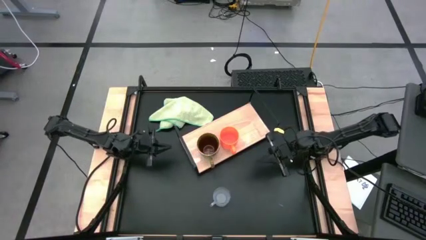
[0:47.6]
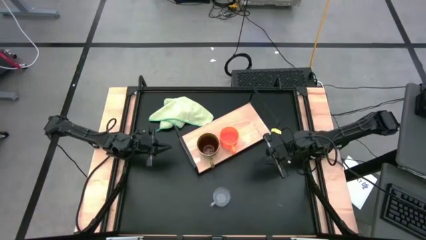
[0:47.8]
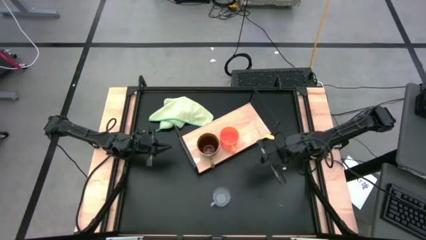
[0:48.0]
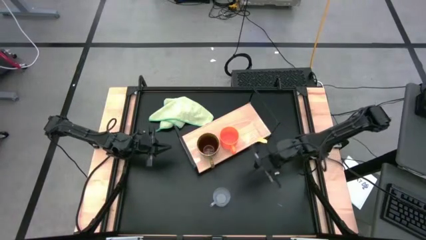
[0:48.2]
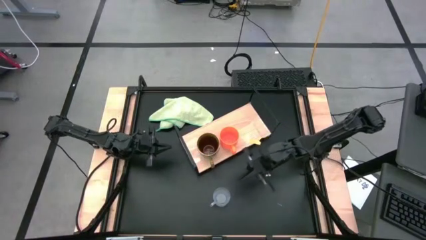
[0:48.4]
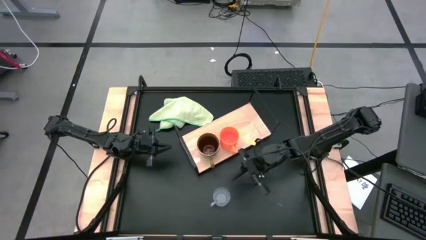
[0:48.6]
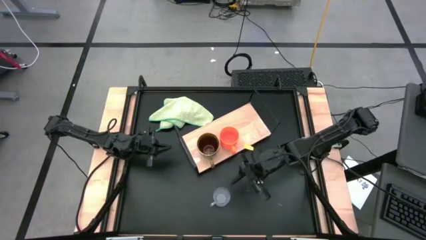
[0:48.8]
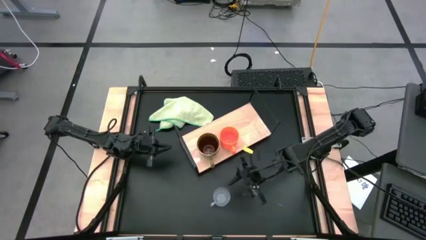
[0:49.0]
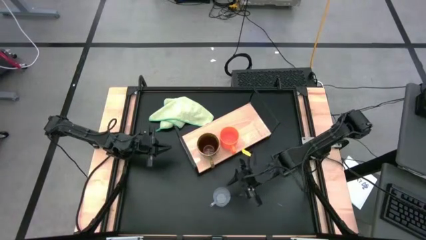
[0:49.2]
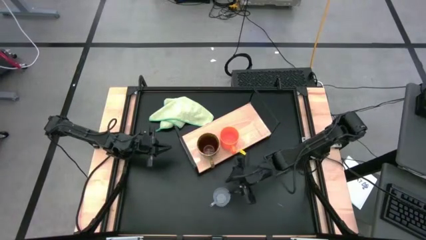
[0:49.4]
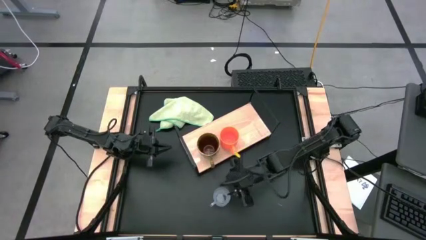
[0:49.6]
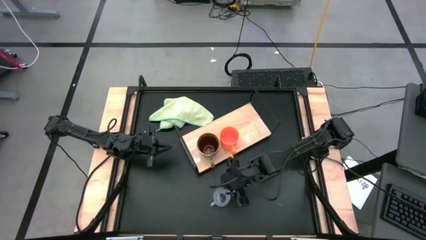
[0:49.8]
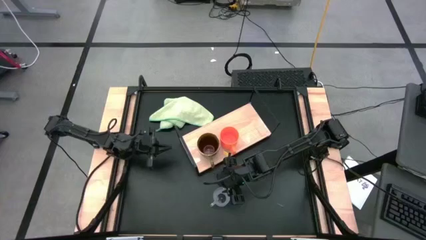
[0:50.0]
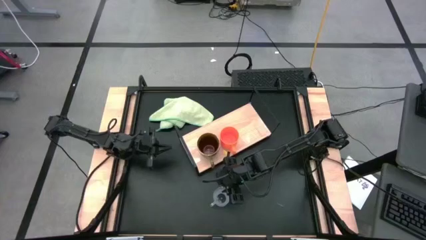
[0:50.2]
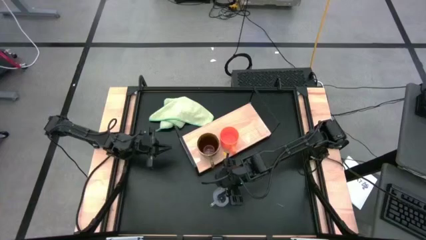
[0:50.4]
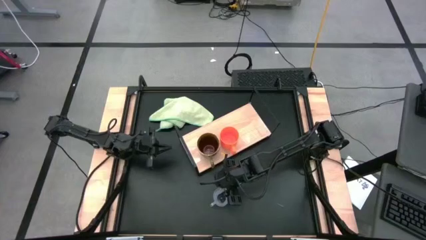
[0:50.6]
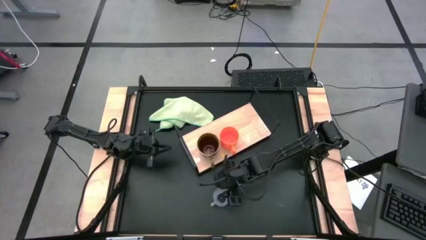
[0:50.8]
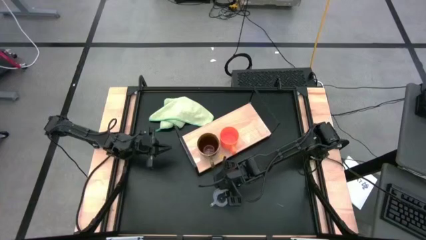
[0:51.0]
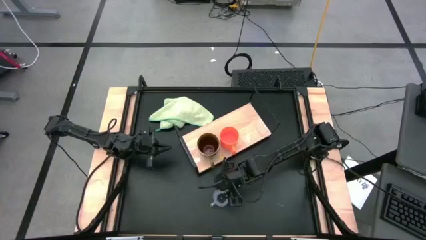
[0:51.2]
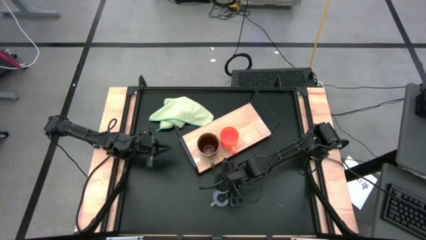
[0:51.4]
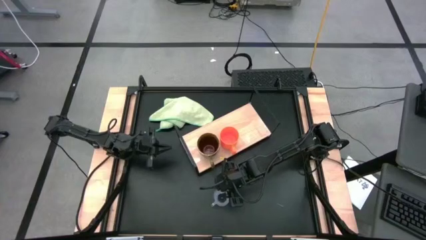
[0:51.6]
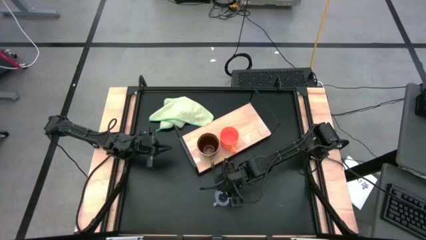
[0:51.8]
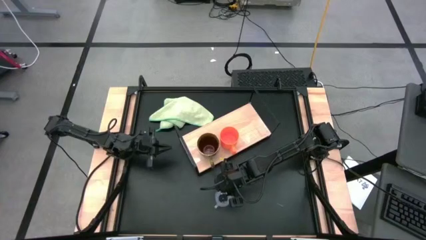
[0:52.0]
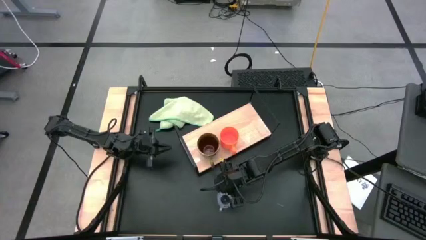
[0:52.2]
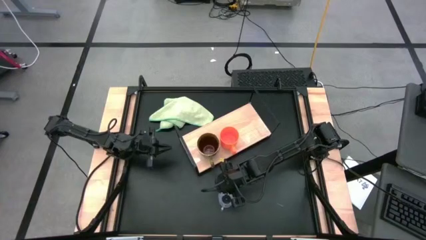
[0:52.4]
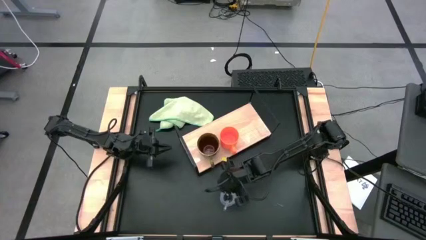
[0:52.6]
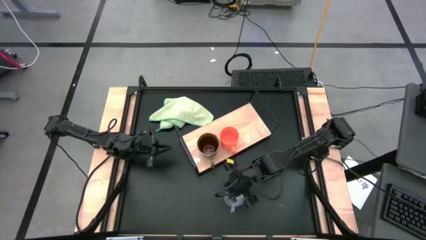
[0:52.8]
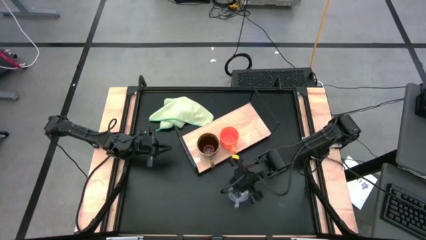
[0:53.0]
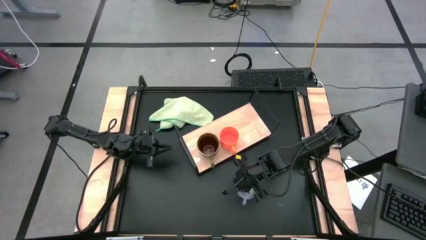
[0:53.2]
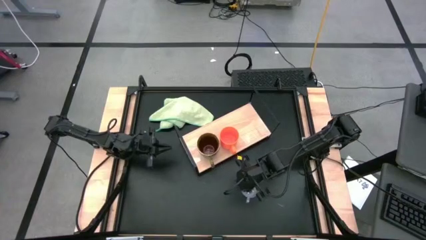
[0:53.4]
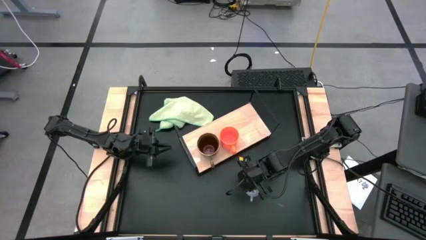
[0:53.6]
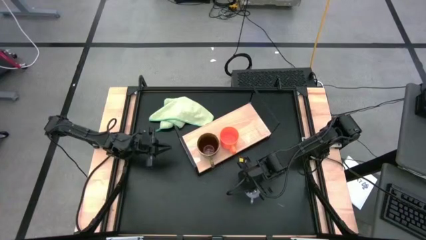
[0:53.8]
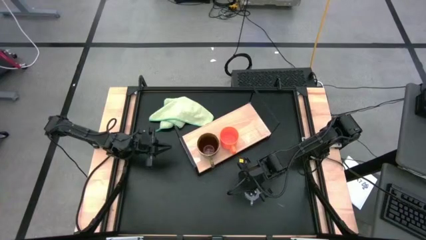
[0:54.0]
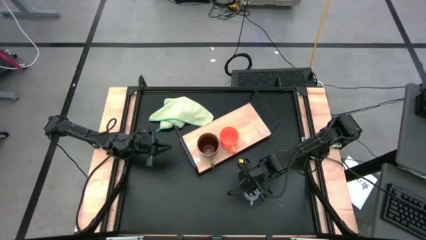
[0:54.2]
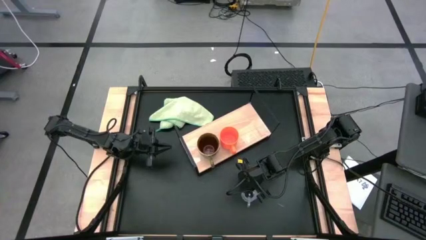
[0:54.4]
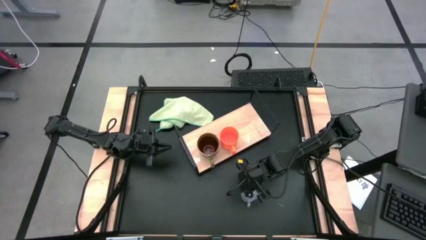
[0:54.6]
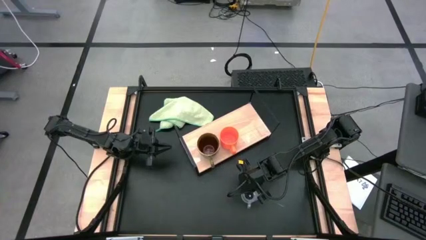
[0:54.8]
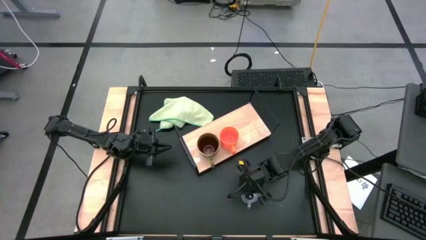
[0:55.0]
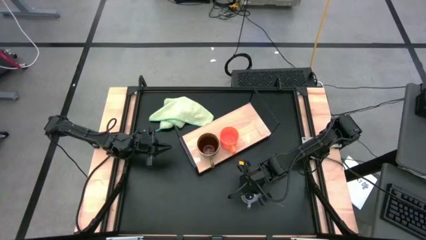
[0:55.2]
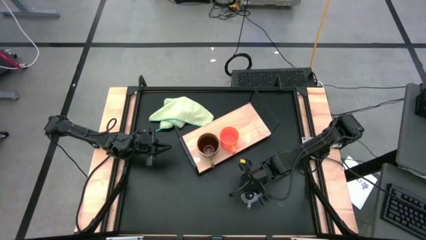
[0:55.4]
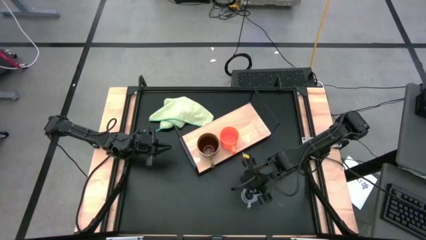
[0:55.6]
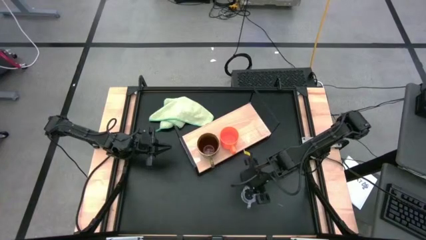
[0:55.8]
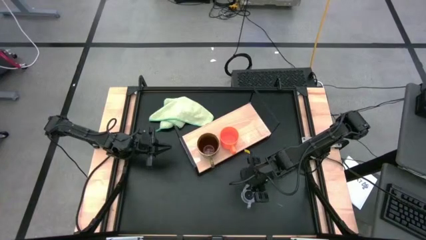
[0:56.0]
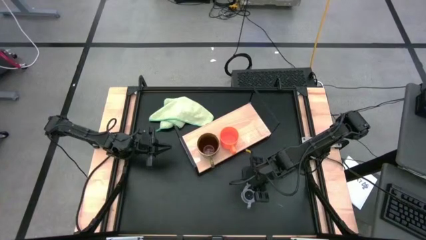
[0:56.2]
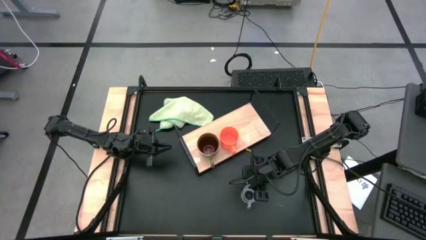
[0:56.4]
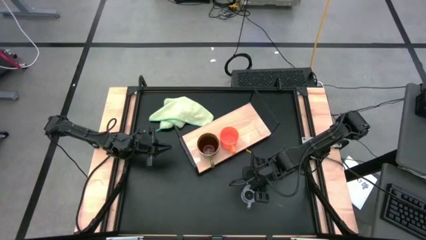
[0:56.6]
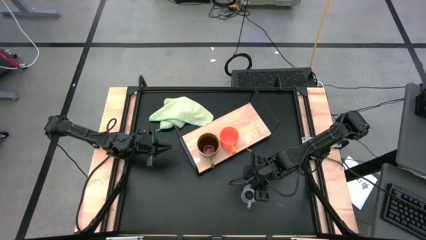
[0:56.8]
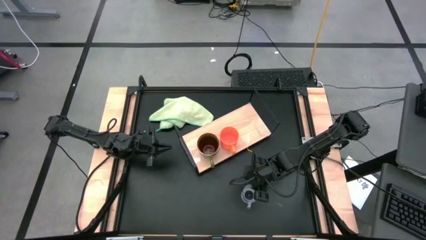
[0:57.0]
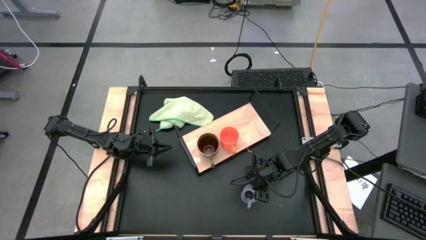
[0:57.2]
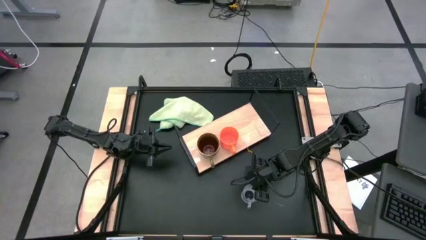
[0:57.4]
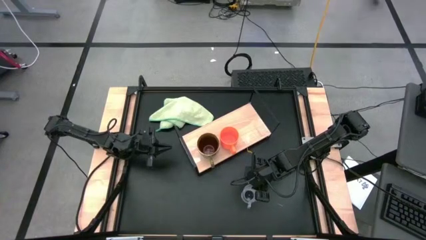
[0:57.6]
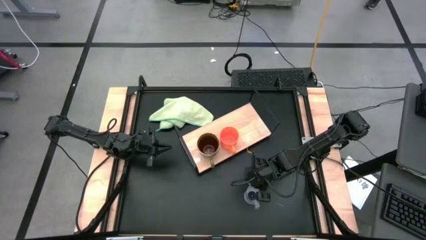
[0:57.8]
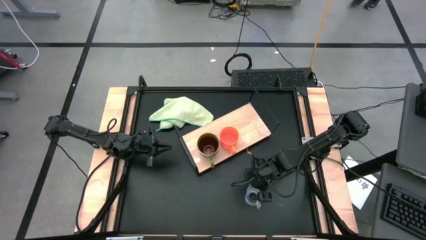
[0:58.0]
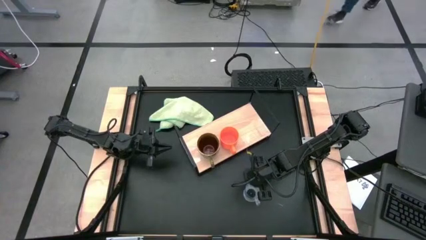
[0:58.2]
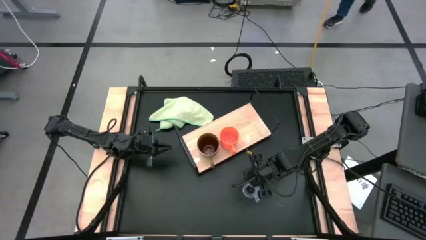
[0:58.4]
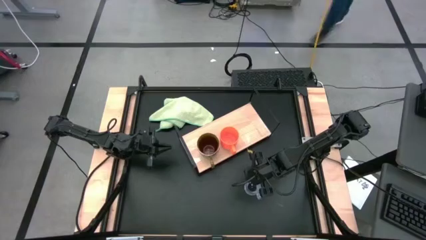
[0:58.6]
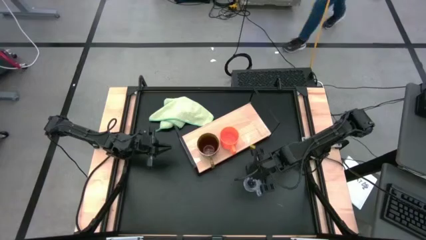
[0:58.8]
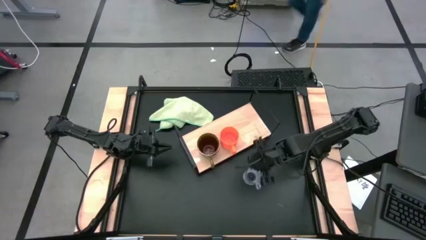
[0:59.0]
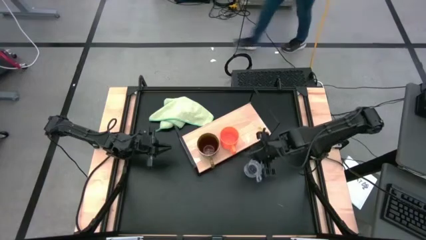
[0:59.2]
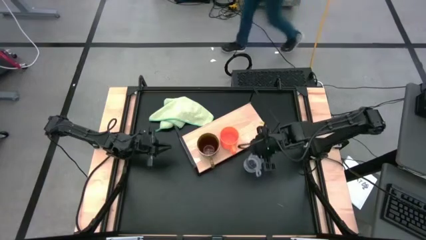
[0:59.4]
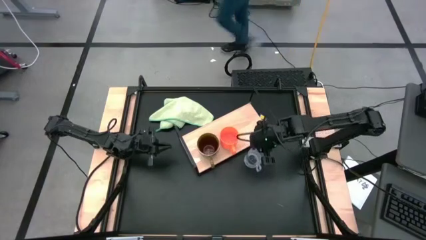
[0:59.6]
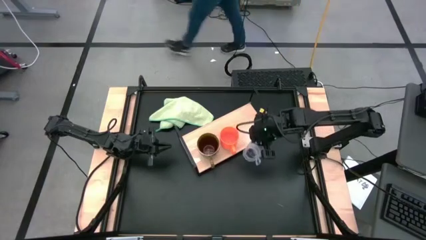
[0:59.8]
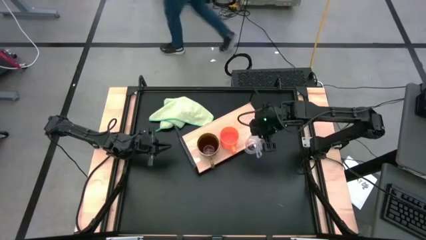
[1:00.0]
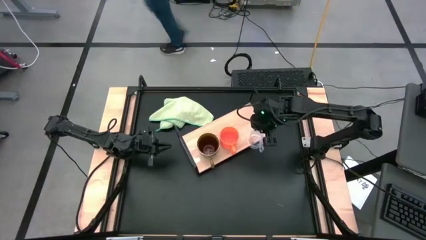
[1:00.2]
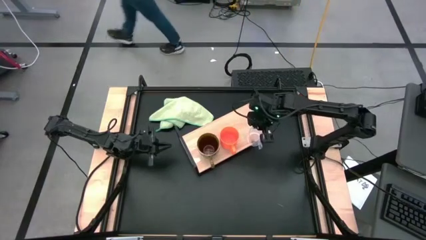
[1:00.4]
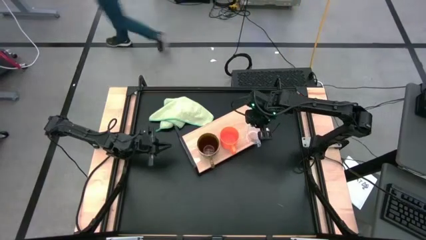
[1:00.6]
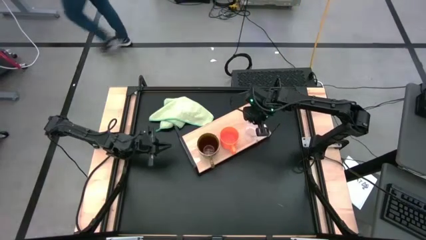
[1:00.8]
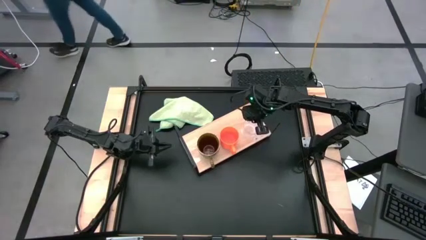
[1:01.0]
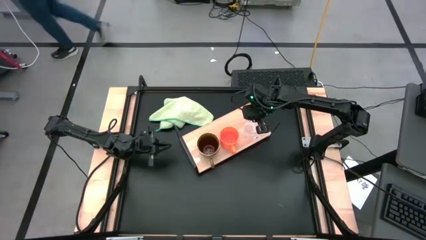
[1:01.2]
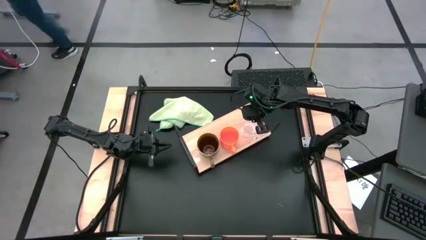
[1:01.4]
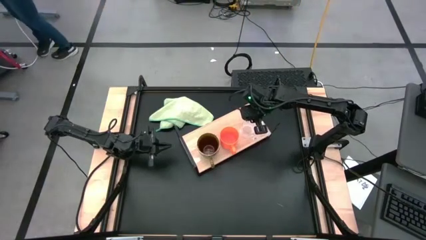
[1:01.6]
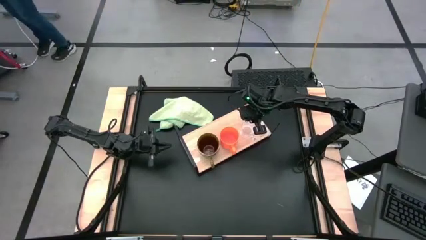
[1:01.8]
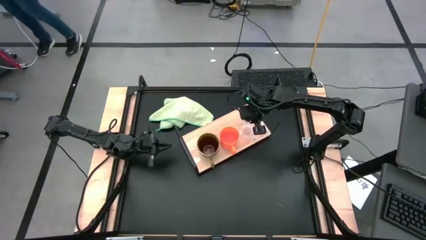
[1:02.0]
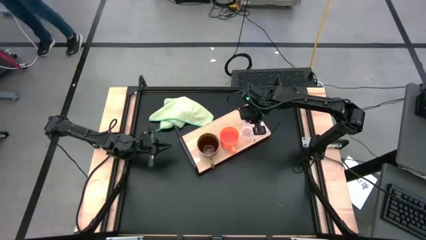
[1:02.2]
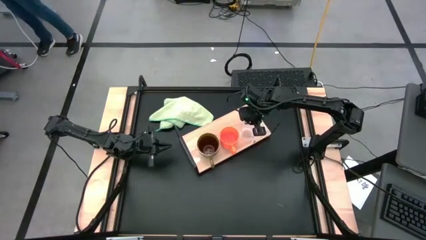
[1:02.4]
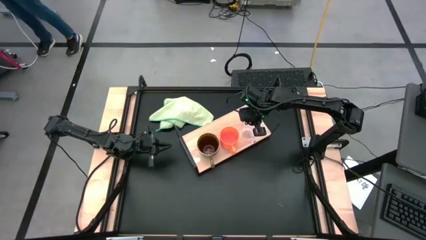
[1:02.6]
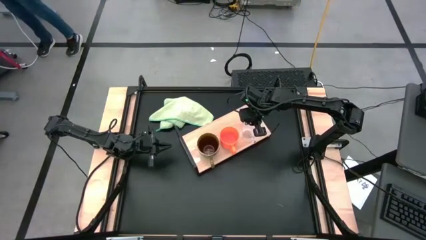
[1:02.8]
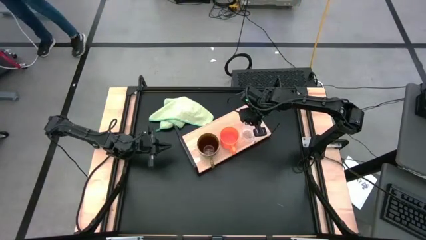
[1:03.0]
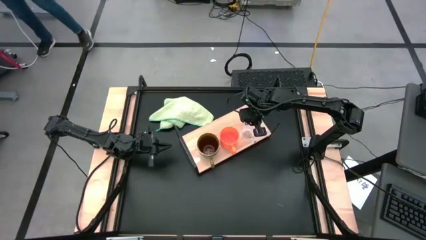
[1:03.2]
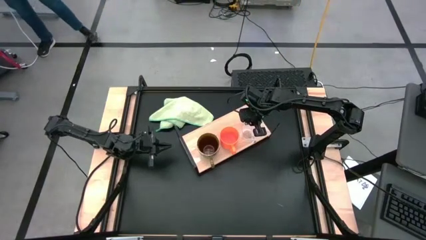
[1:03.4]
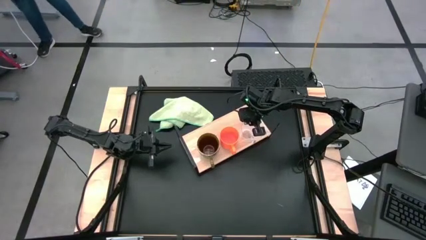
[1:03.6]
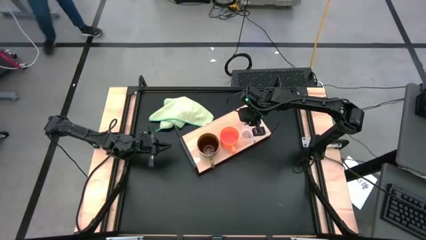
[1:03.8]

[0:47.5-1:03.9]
Task: Stack small to large cups/mugs on shelf
Put the transparent mug on the shelf
